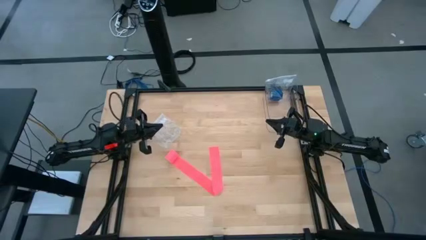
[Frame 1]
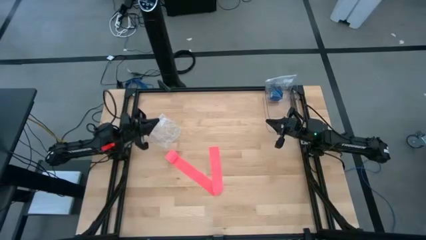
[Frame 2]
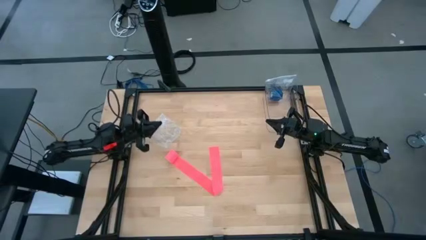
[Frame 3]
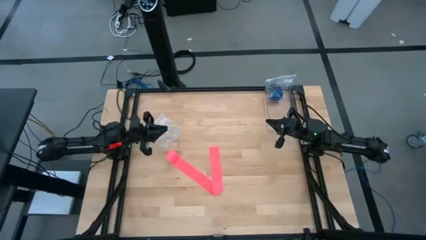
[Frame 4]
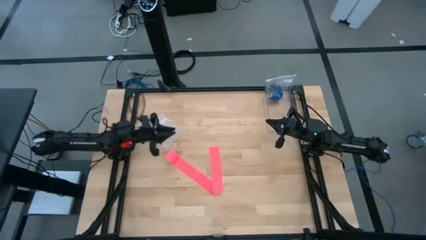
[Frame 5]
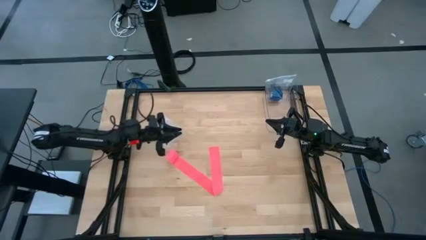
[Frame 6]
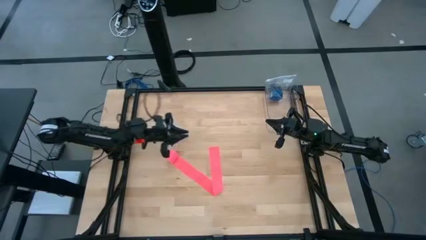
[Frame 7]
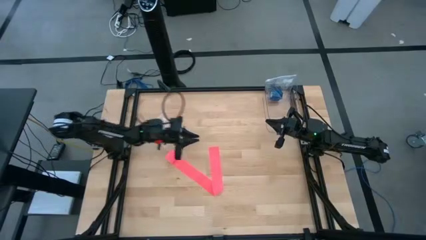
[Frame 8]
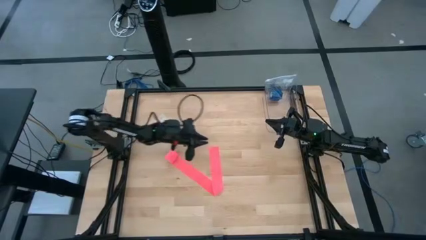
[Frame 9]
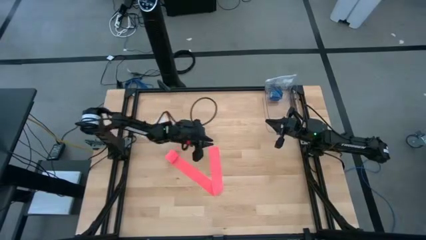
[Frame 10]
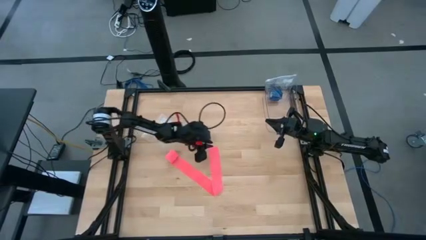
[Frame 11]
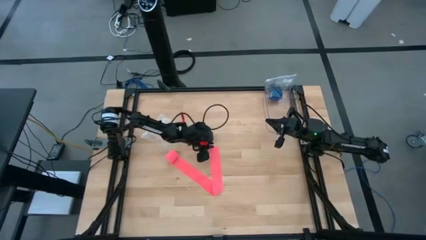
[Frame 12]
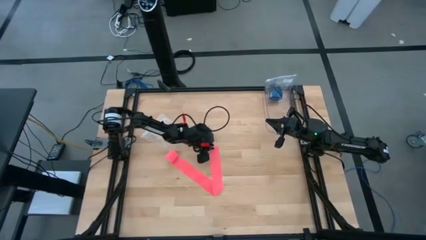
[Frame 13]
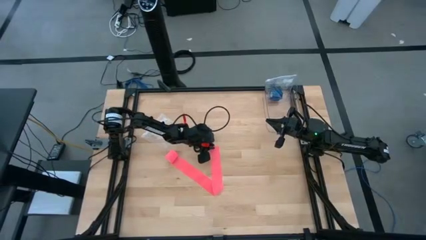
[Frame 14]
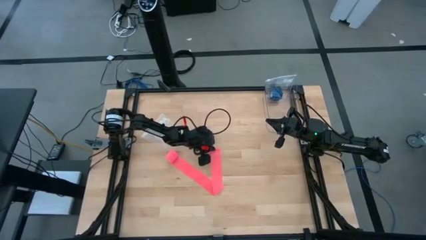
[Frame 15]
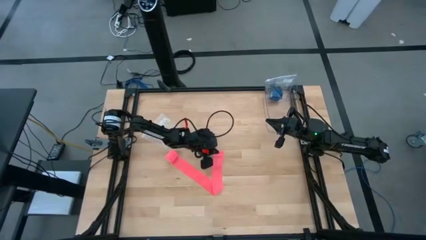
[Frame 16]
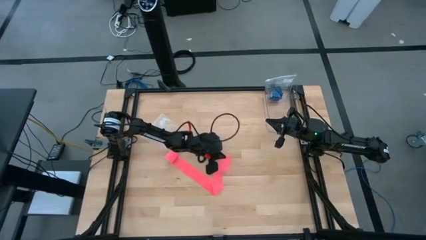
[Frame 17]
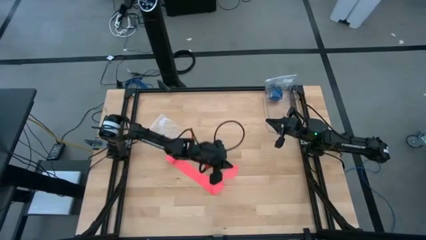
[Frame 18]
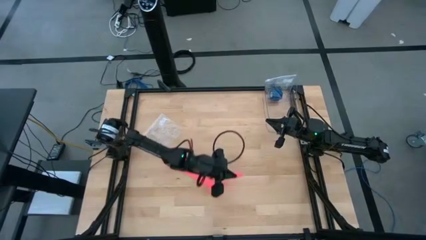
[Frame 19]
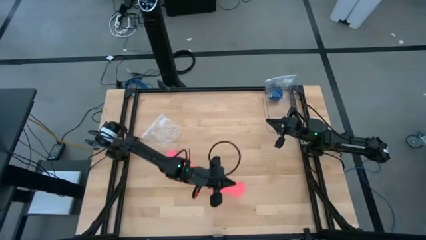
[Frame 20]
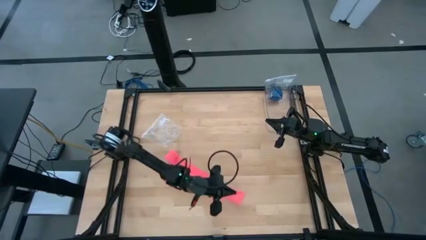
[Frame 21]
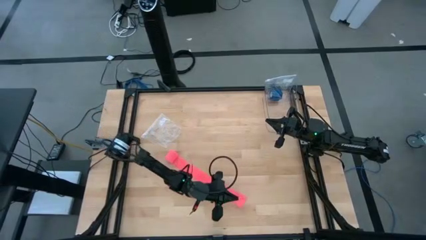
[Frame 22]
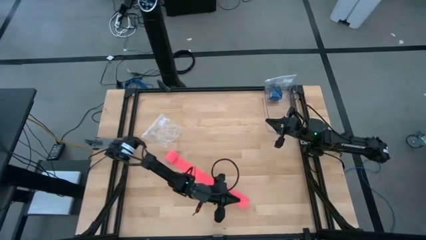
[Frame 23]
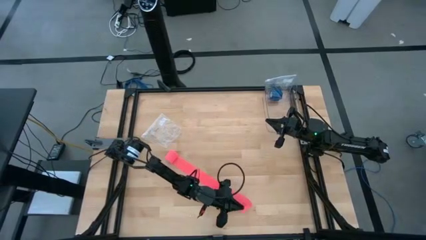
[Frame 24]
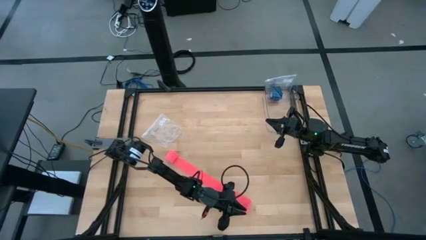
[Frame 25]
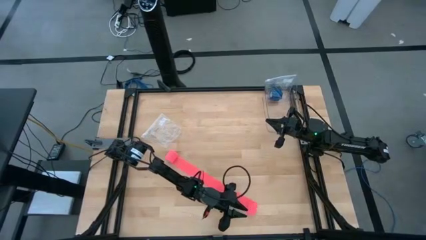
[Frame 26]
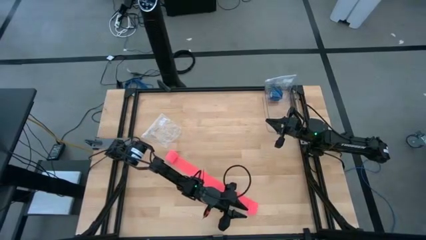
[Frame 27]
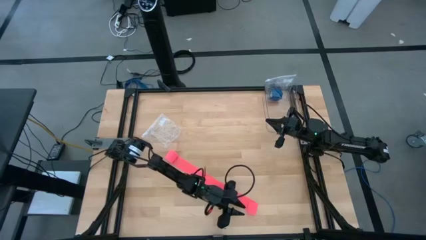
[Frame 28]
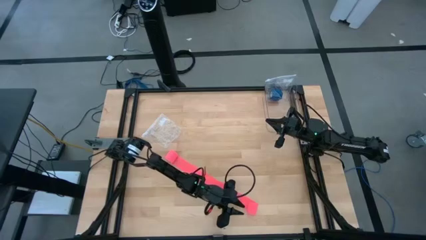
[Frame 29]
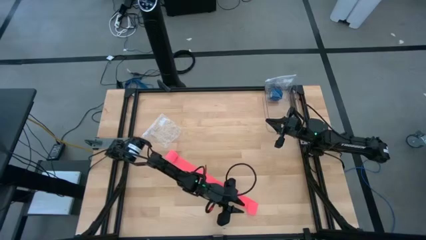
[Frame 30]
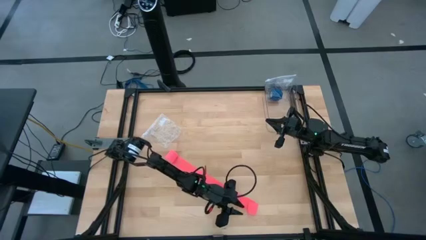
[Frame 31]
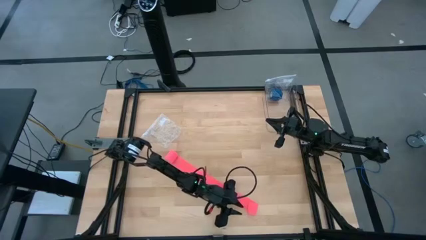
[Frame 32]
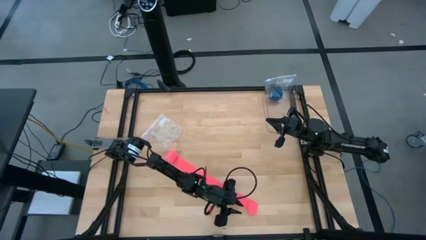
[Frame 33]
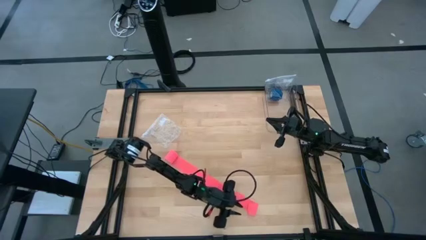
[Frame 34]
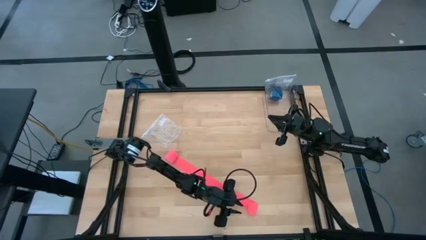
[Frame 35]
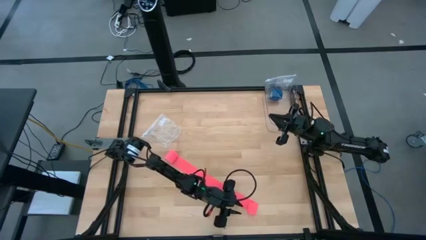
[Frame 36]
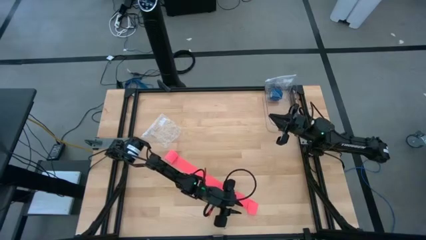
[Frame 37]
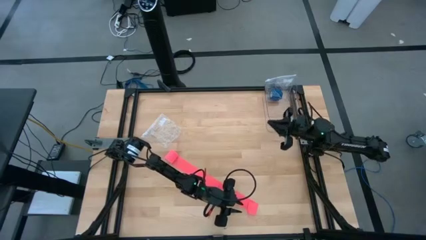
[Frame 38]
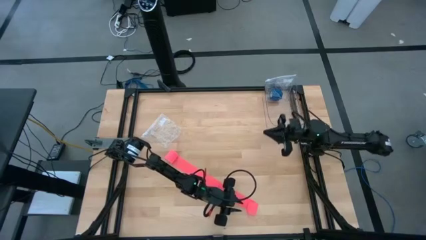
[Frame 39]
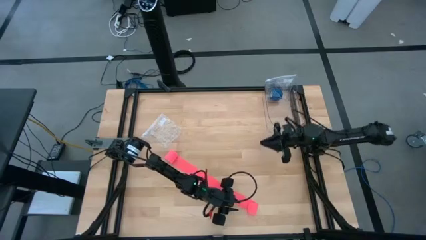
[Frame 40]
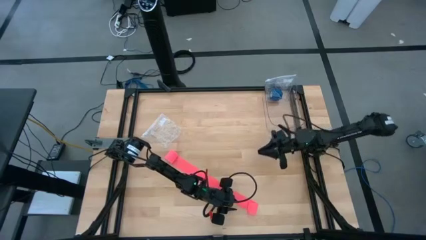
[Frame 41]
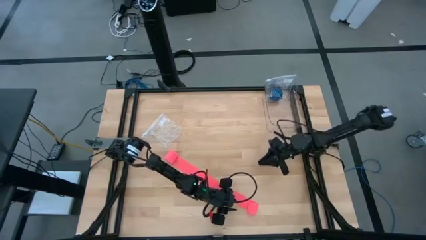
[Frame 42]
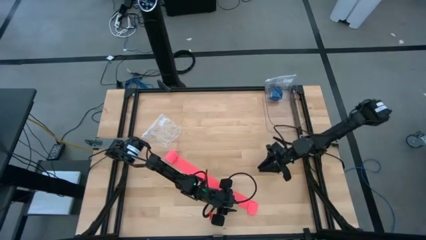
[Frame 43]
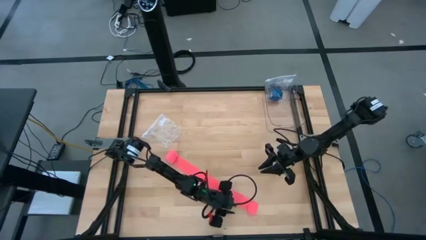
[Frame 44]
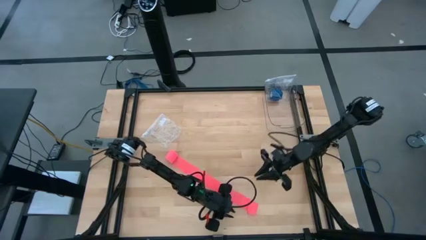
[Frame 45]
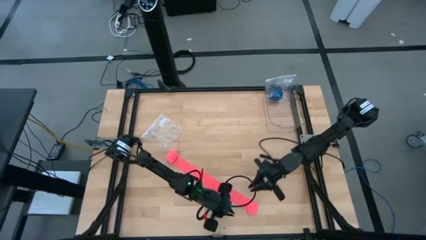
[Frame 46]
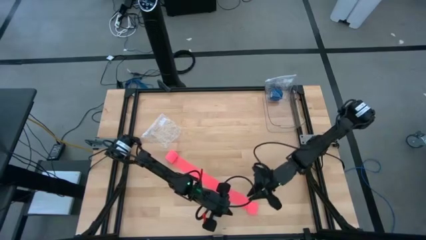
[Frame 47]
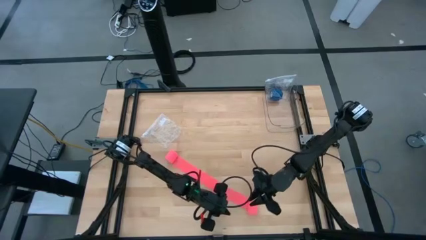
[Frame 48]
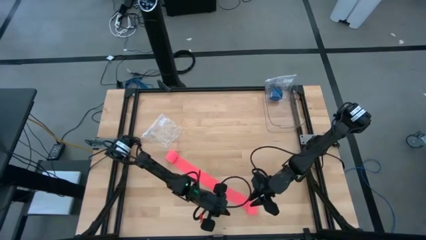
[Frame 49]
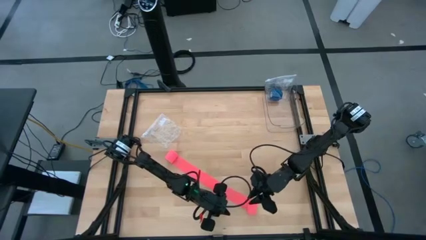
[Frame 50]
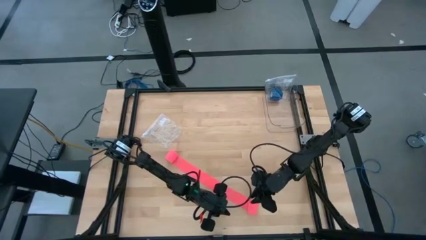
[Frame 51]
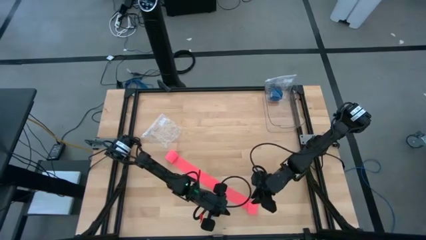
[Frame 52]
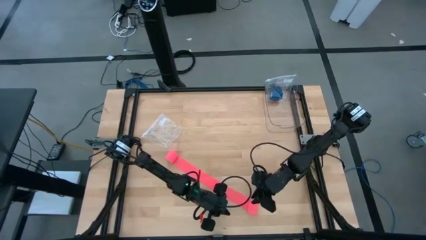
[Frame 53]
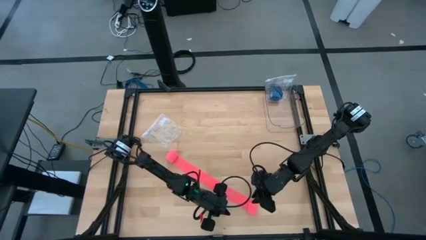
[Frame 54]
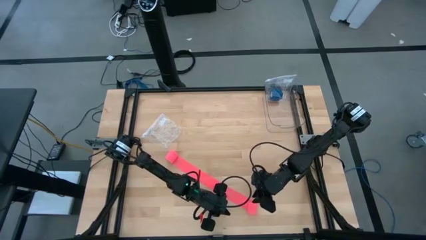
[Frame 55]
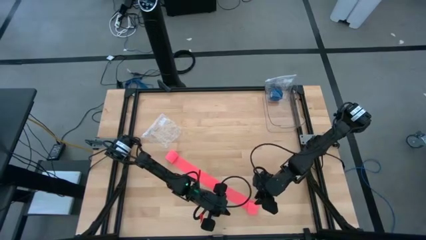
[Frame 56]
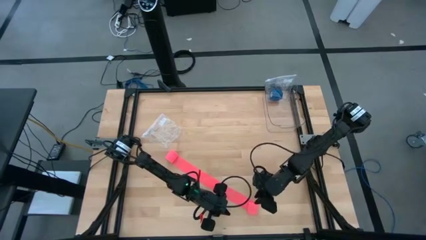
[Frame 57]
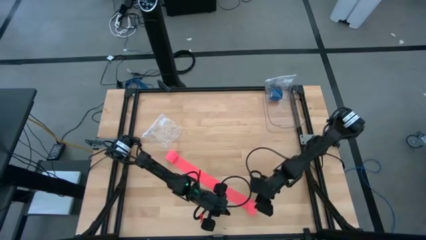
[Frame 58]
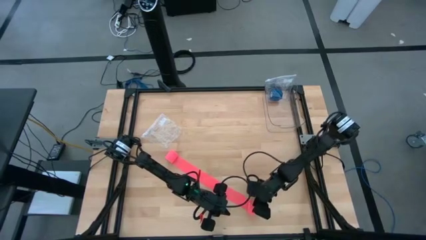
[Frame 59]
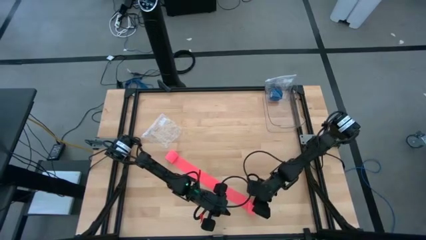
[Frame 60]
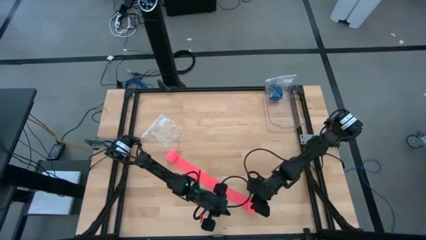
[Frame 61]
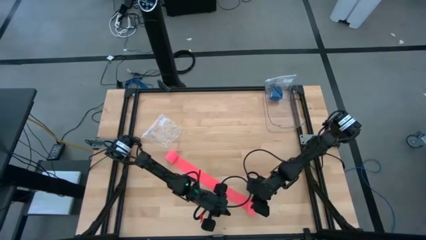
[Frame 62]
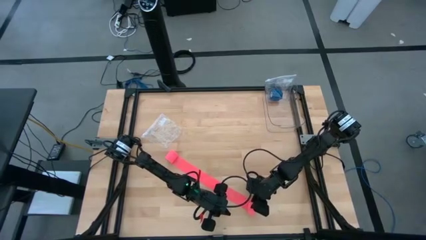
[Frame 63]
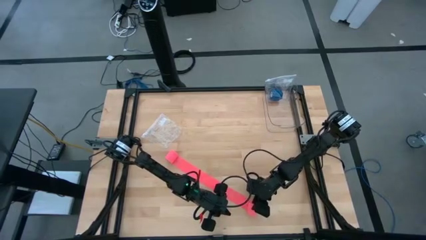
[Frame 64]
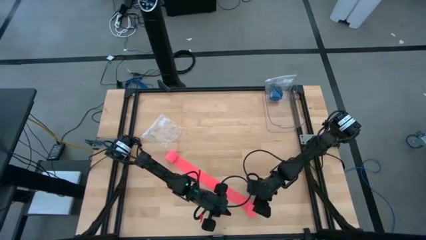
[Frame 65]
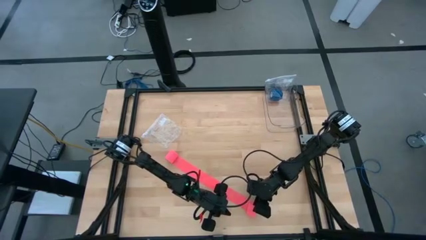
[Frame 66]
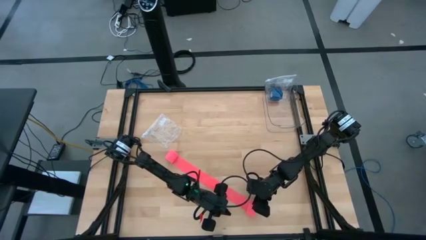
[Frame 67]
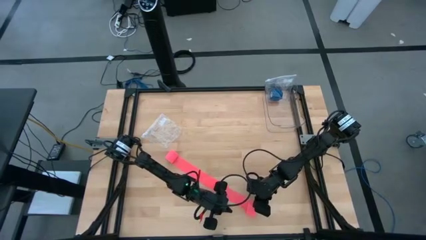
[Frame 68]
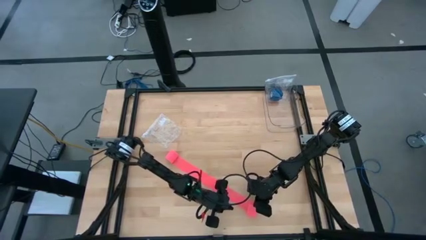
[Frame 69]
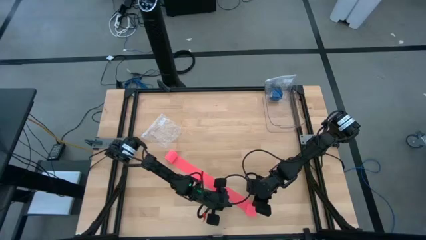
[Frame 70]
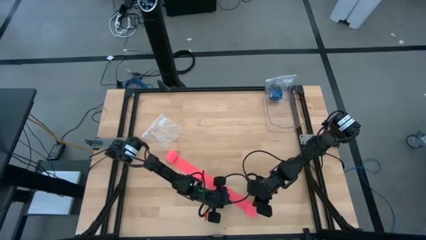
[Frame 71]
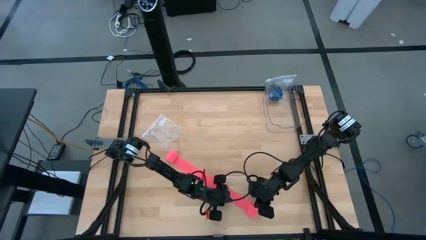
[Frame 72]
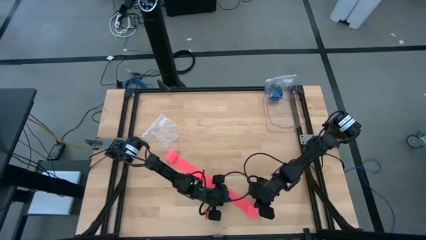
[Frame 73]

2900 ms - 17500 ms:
Task: Roll bandage
Roll the pink bandage
